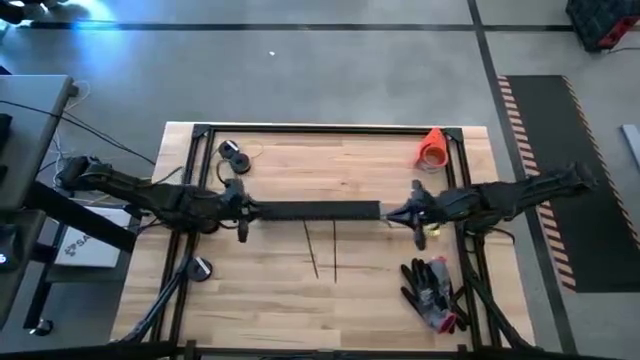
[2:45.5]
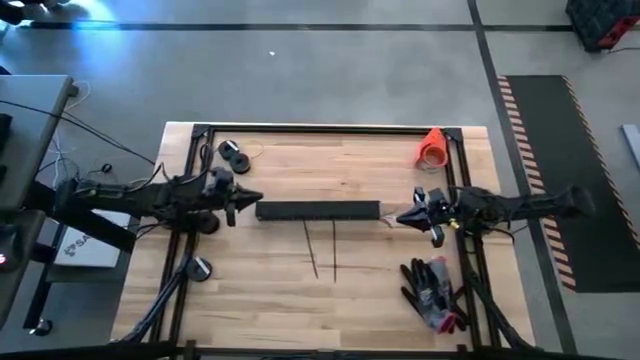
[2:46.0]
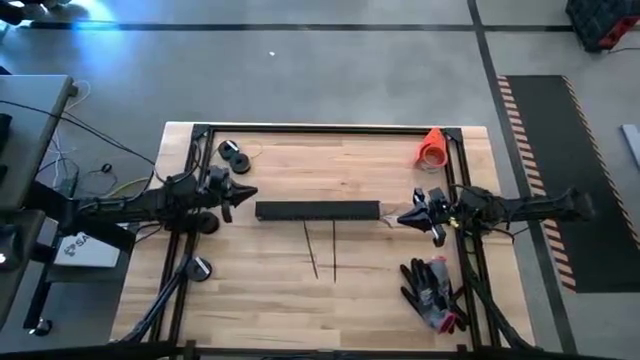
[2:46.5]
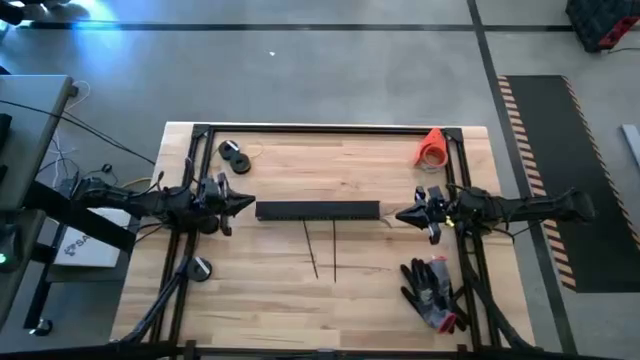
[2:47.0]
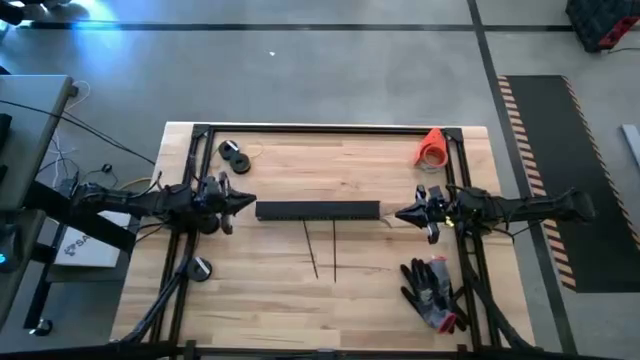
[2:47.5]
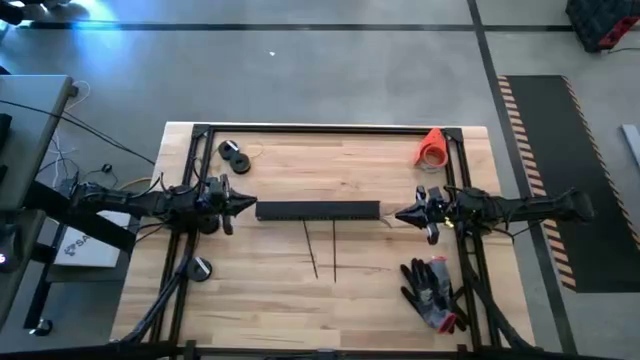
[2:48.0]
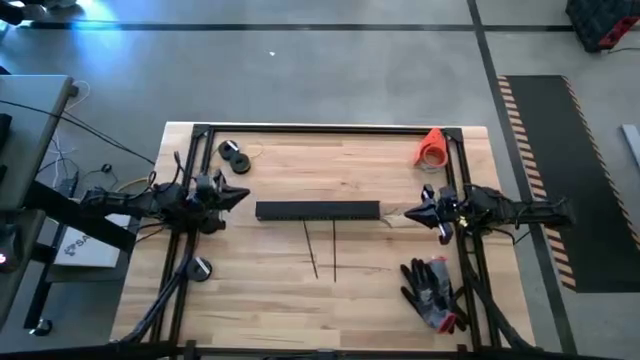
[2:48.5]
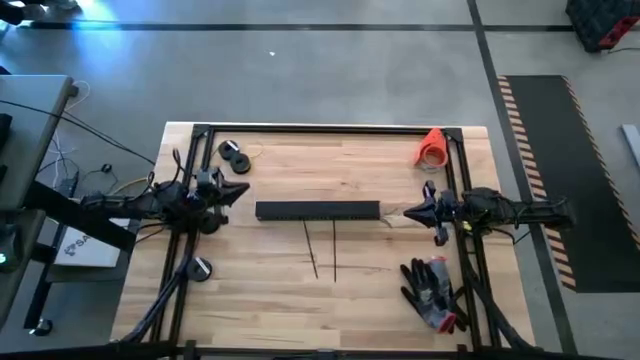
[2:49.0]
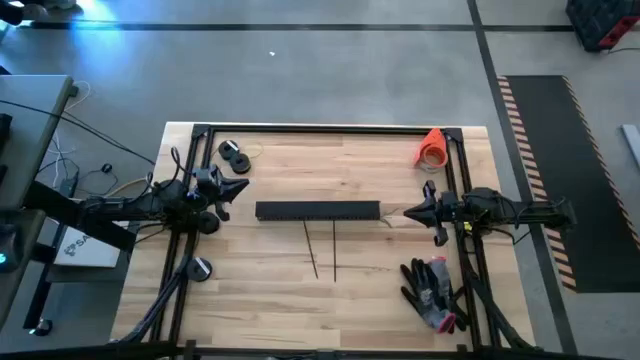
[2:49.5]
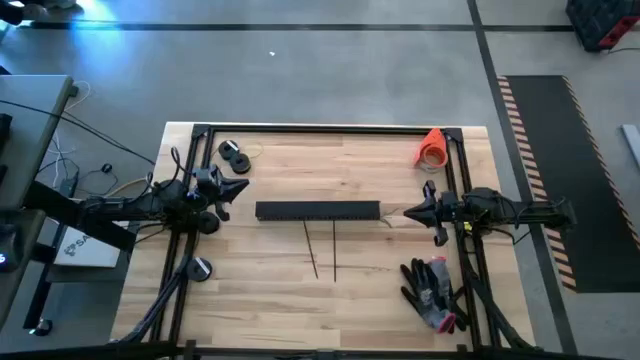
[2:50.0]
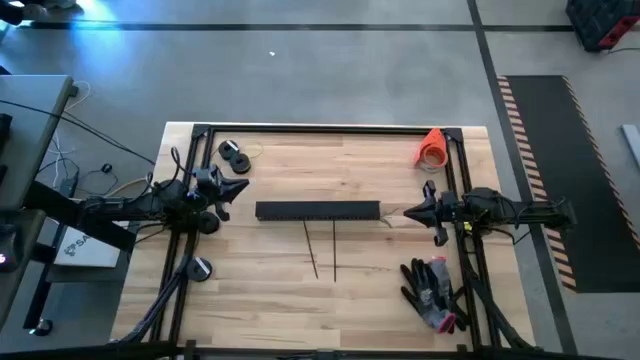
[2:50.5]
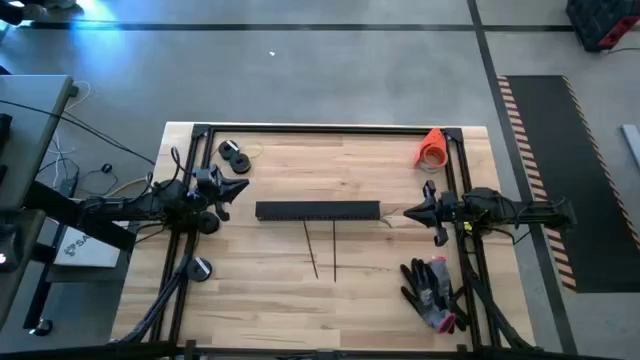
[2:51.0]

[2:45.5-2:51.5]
Task: Ziptie cables
Return to Home Position

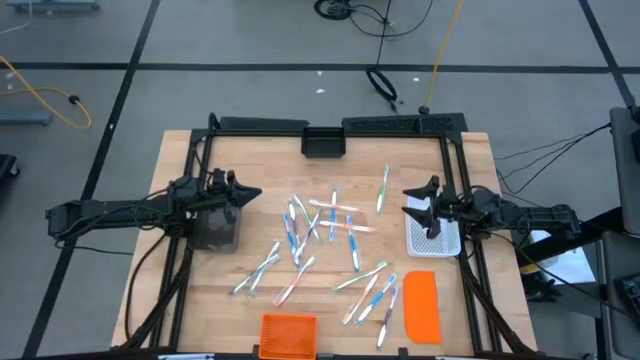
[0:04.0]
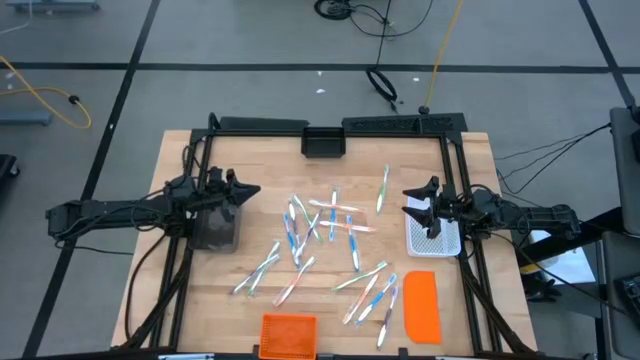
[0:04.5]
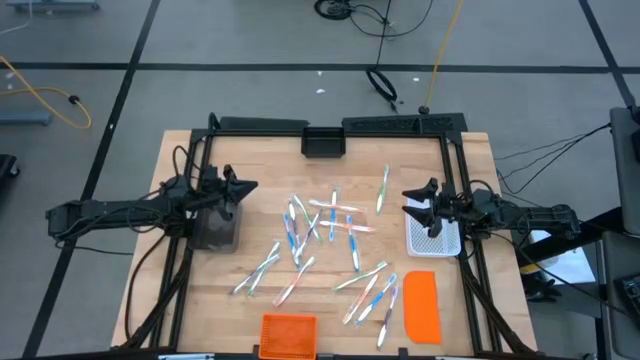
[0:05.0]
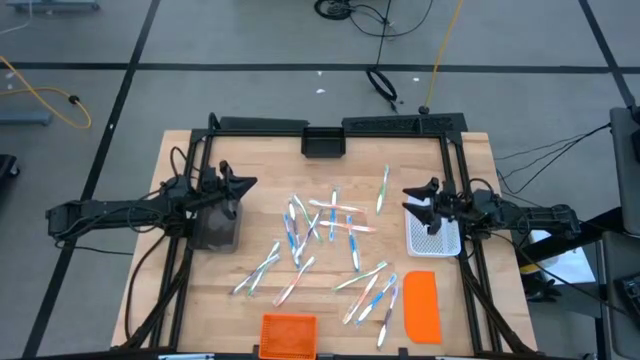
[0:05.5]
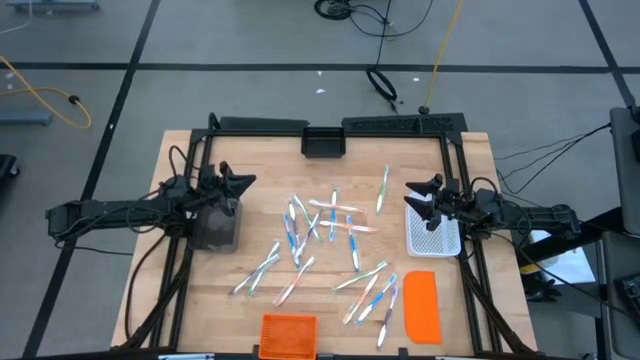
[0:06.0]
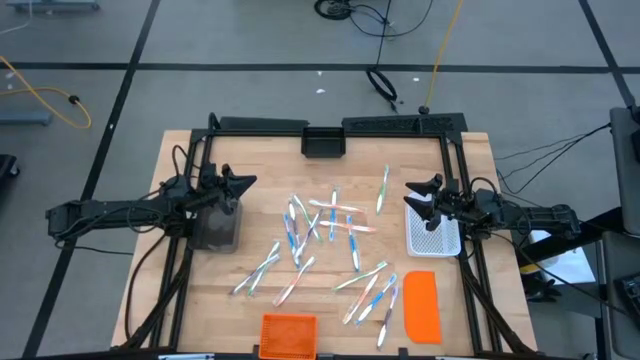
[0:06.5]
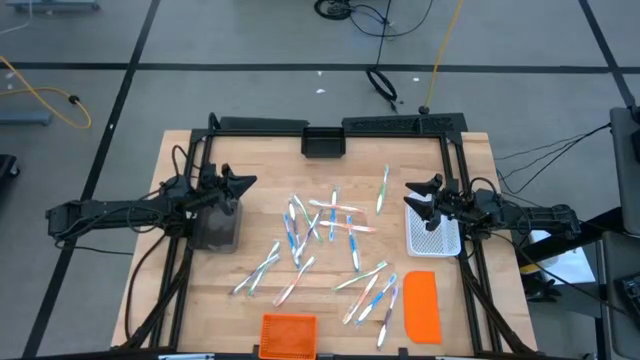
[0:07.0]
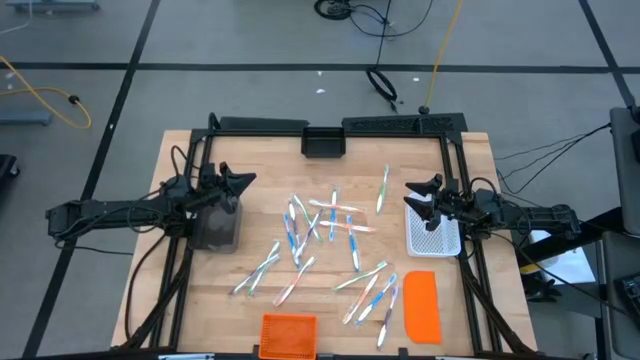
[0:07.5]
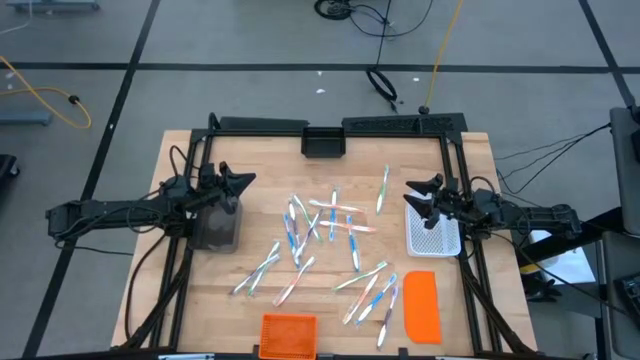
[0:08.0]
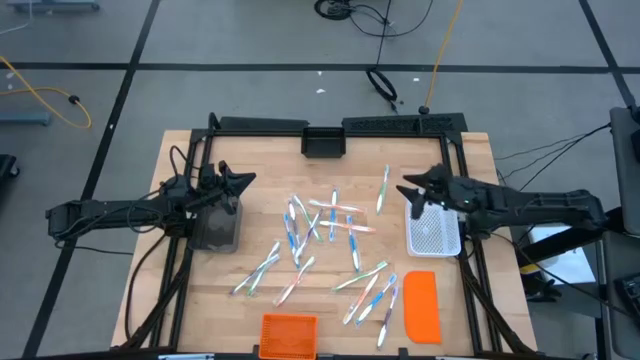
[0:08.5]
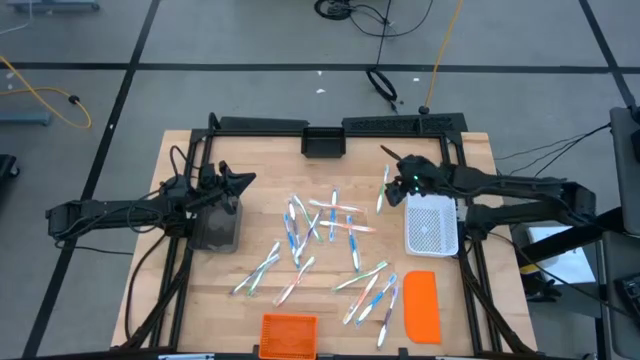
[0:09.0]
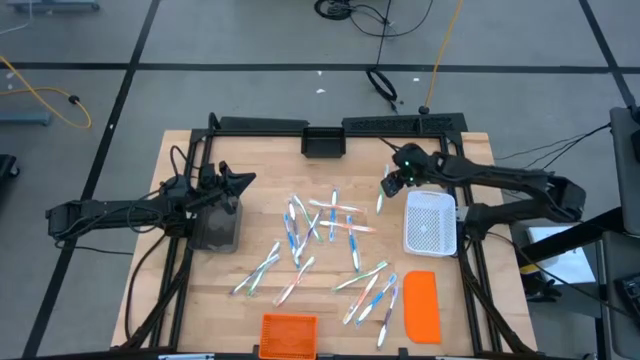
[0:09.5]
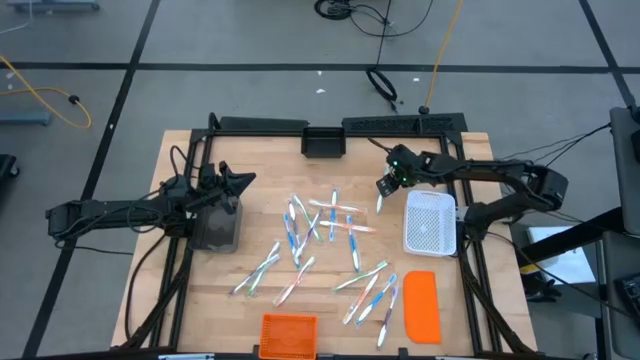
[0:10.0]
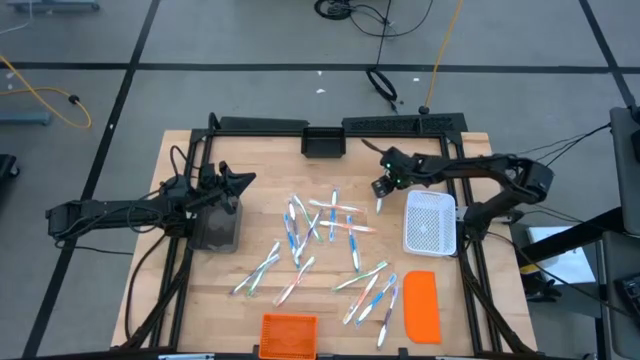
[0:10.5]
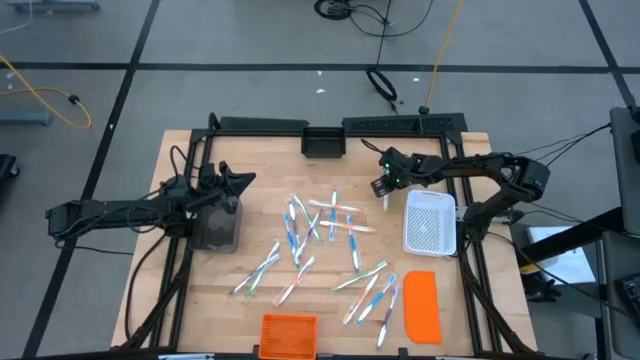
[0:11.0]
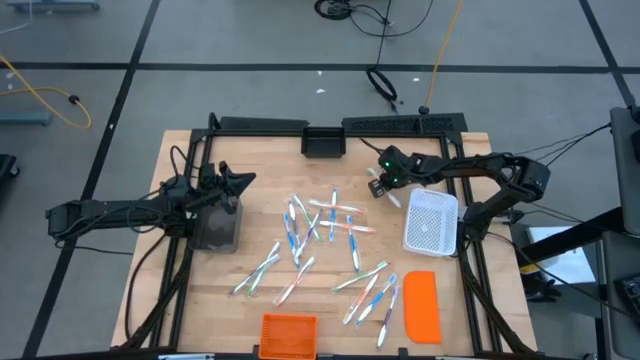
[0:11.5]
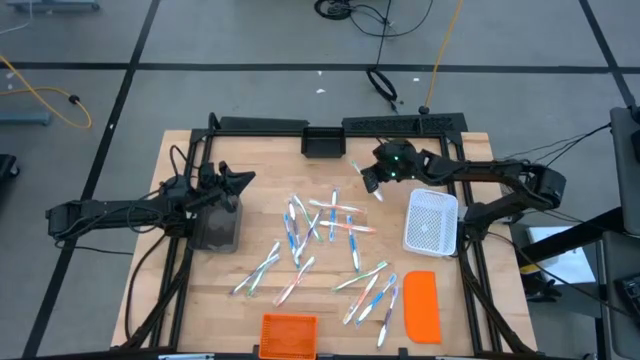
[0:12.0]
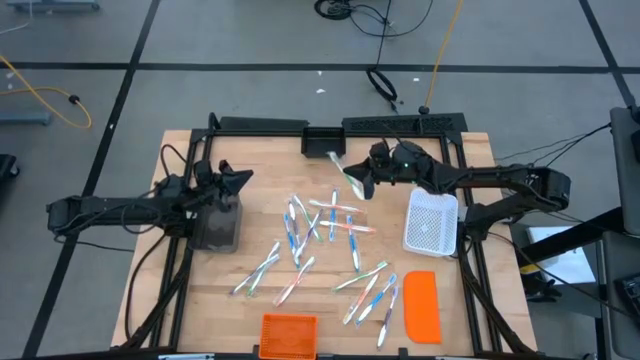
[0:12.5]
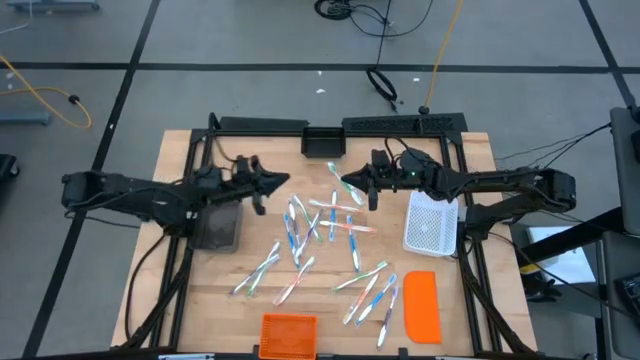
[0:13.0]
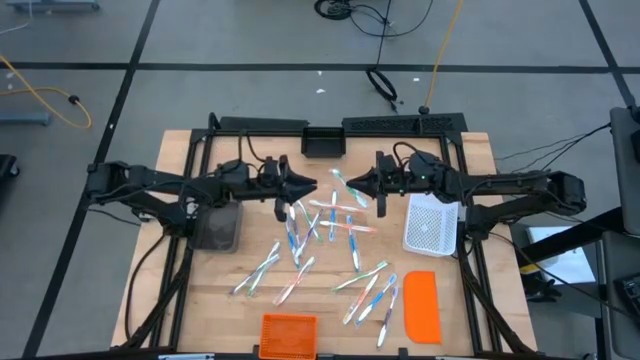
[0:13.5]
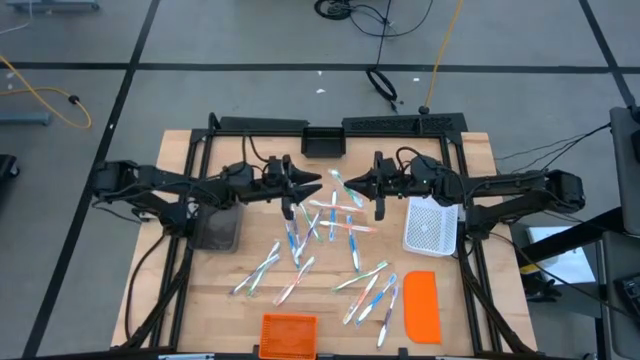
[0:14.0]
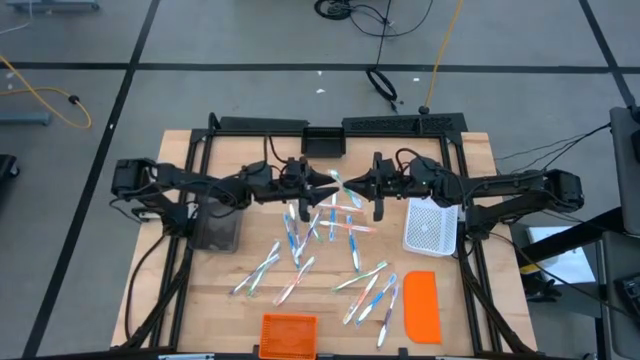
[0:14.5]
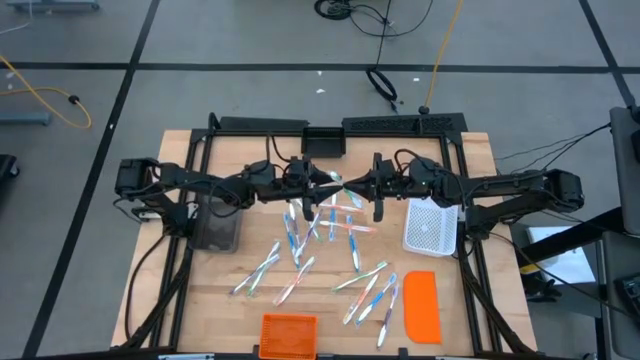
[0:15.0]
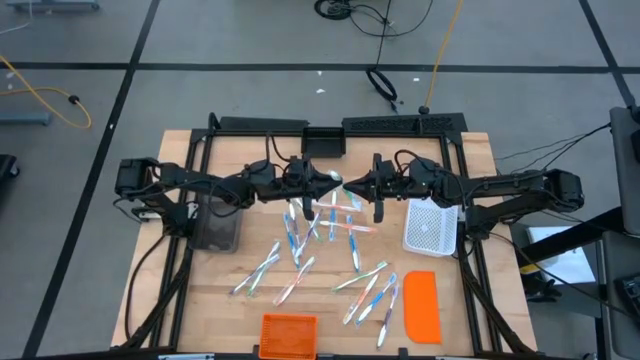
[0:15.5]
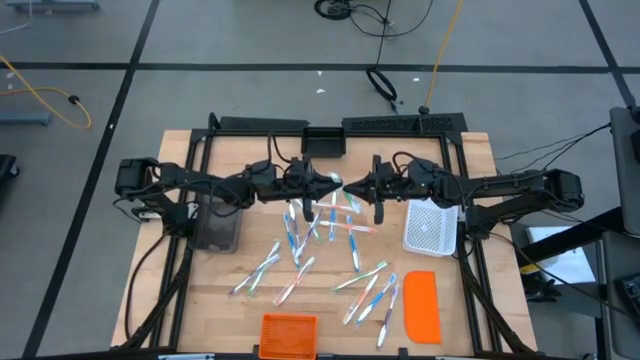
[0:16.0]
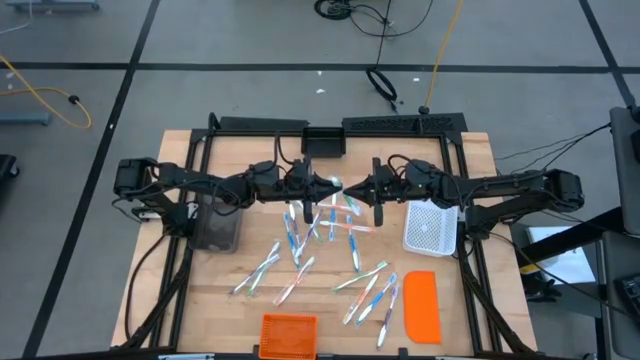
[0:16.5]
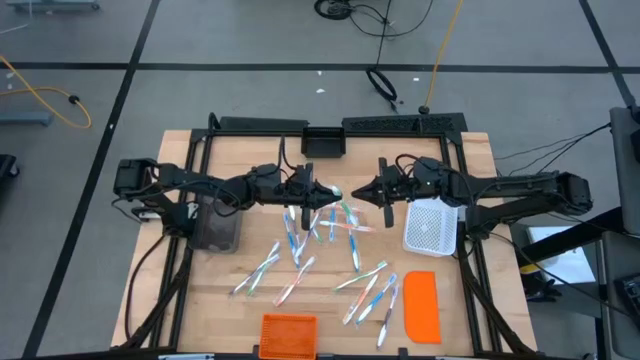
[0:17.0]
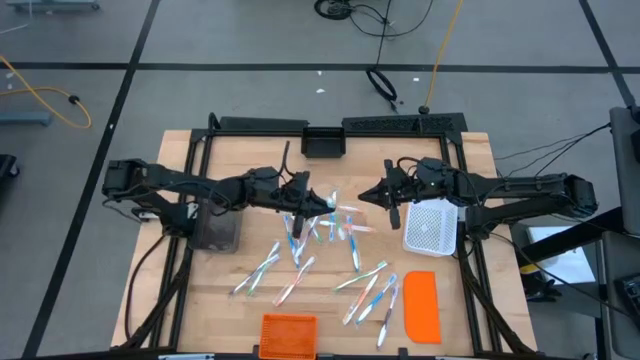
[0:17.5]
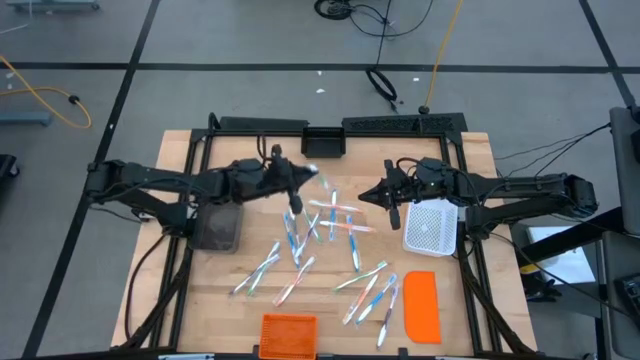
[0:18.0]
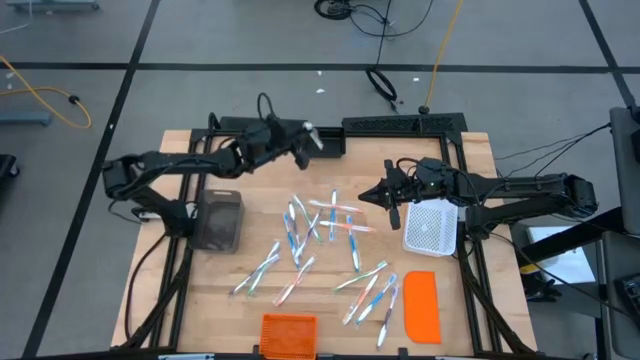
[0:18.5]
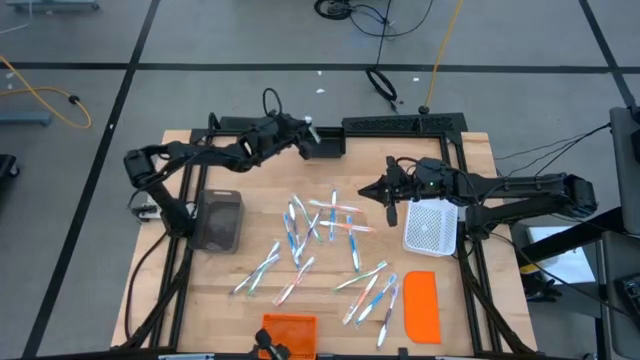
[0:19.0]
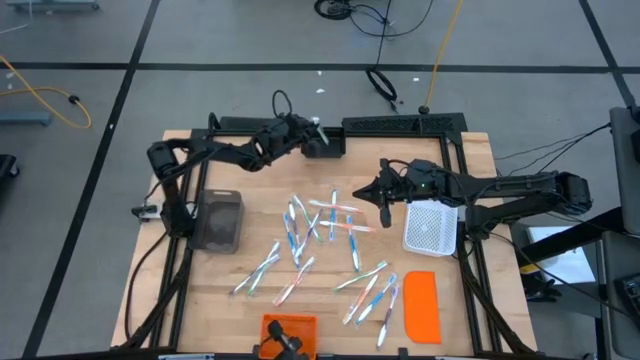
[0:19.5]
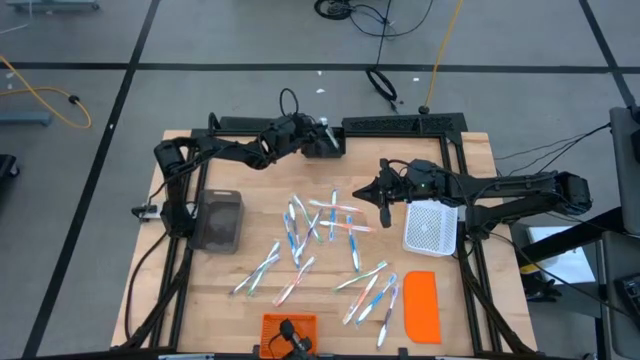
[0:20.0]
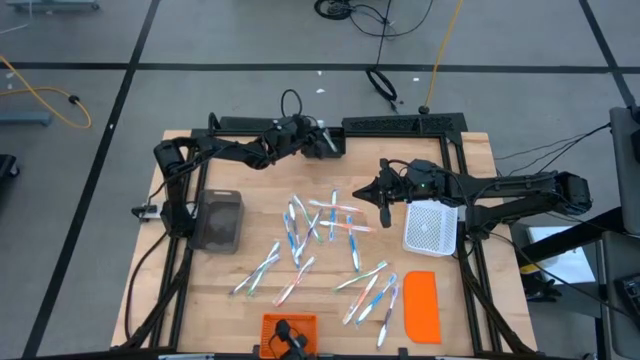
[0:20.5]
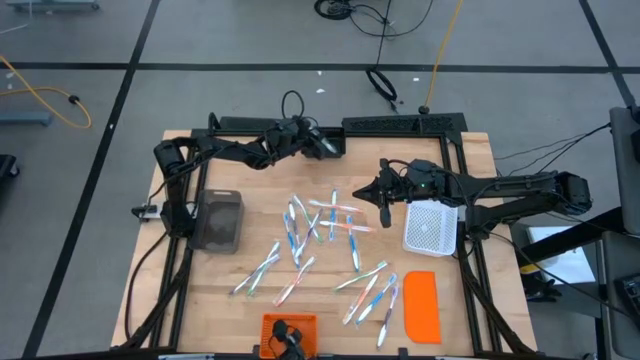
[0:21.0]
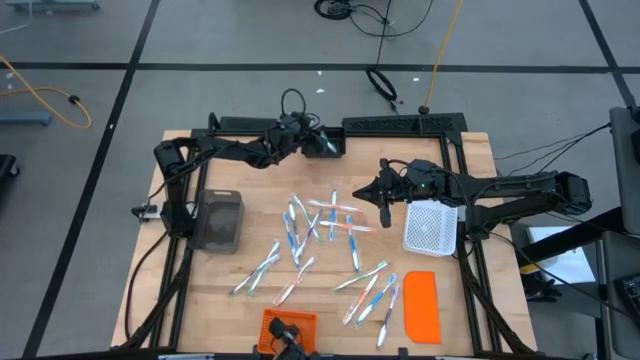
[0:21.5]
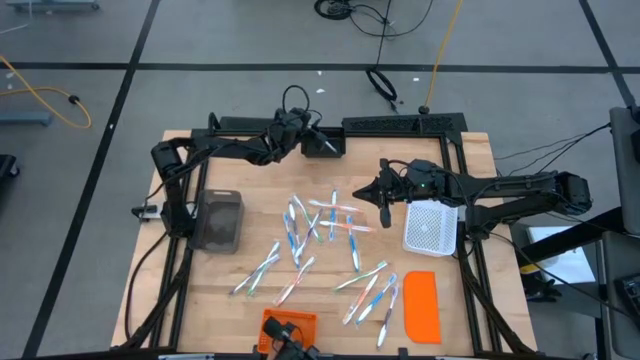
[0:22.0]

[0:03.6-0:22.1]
Task: Pick & Place Toothbrushes
Put the green toothbrush into the black bin
